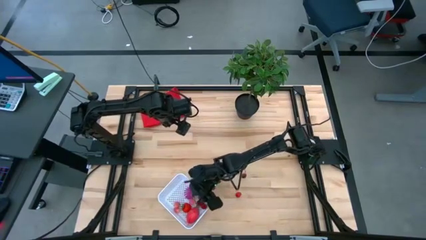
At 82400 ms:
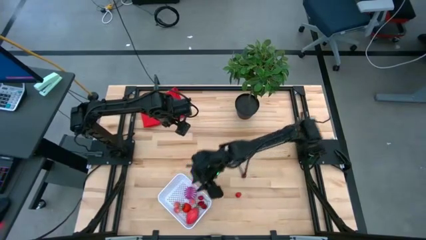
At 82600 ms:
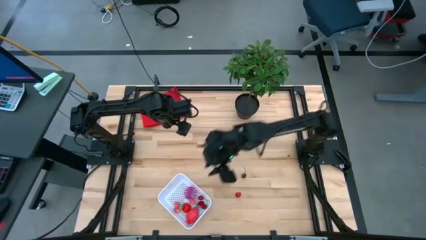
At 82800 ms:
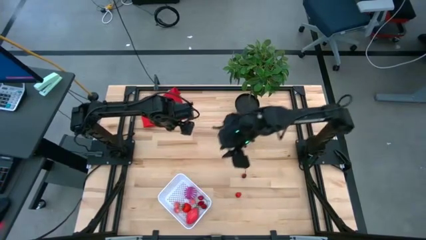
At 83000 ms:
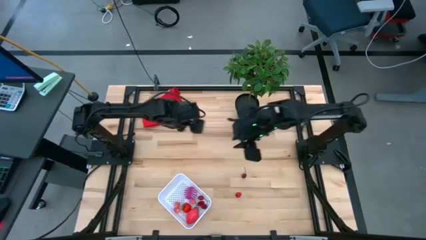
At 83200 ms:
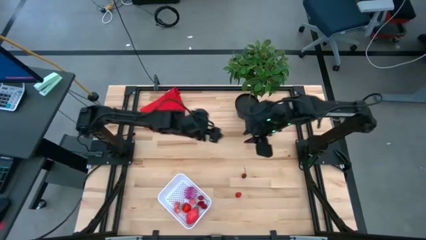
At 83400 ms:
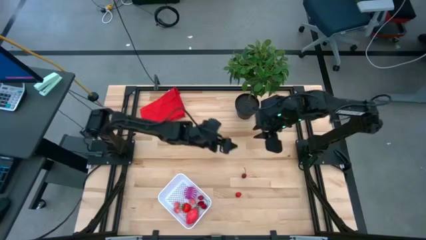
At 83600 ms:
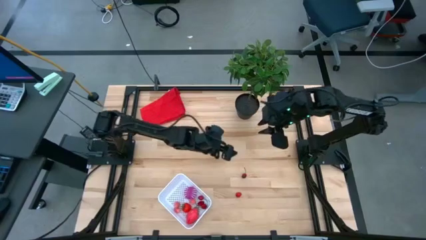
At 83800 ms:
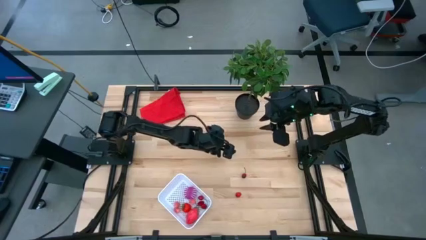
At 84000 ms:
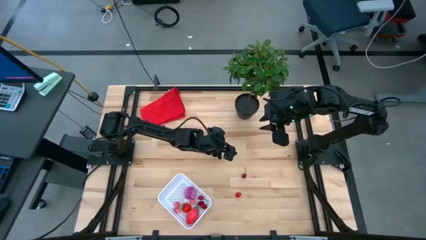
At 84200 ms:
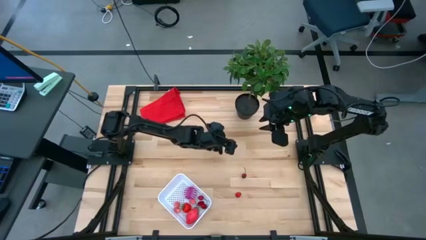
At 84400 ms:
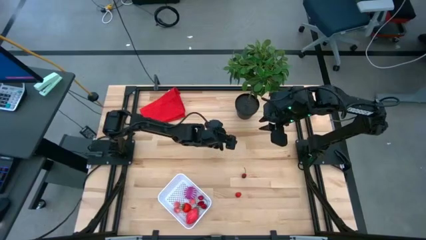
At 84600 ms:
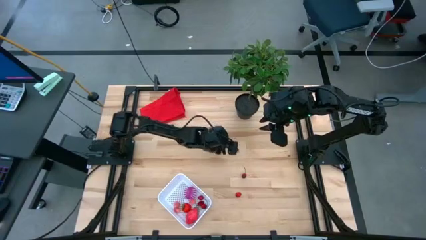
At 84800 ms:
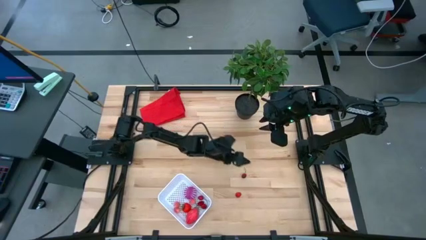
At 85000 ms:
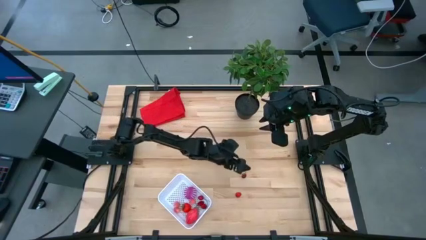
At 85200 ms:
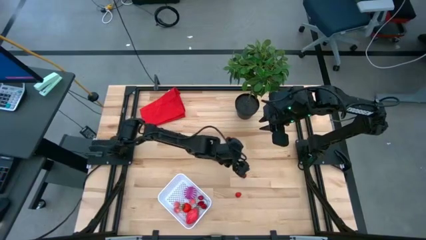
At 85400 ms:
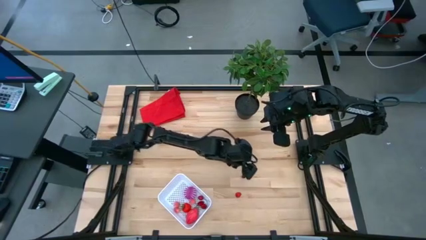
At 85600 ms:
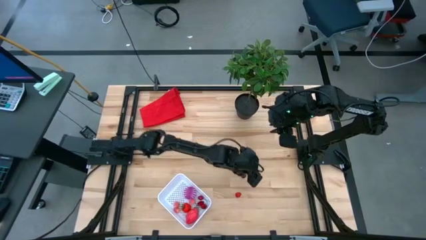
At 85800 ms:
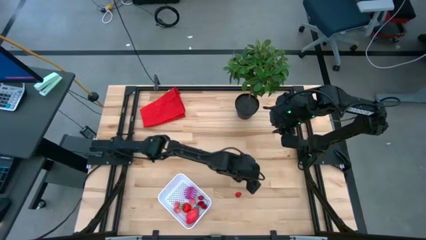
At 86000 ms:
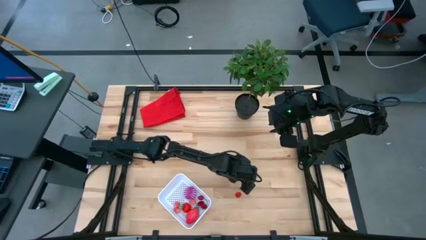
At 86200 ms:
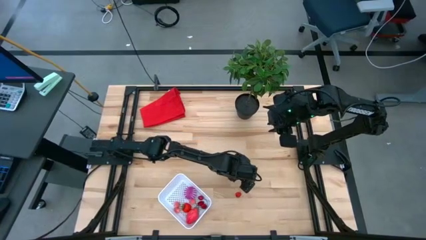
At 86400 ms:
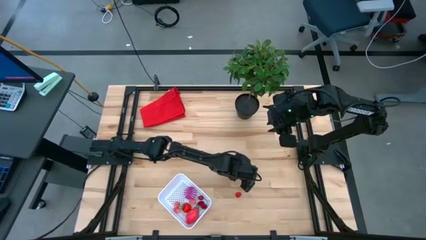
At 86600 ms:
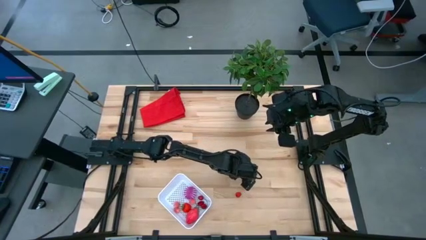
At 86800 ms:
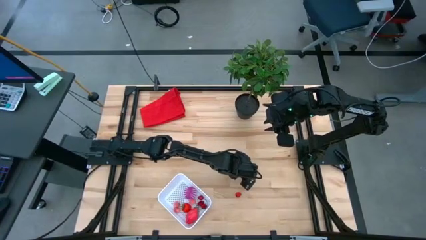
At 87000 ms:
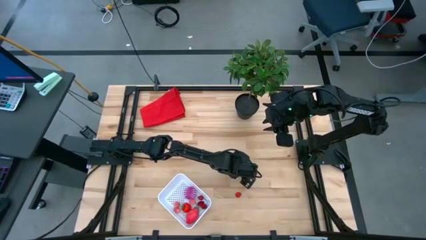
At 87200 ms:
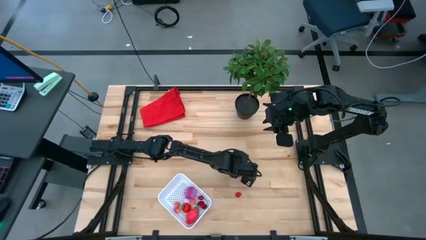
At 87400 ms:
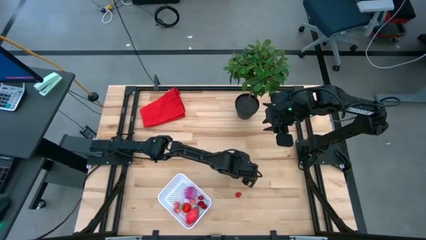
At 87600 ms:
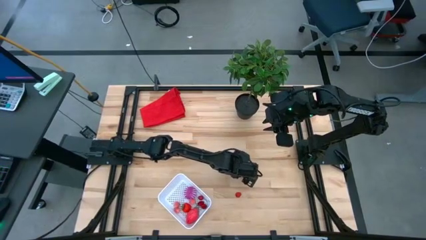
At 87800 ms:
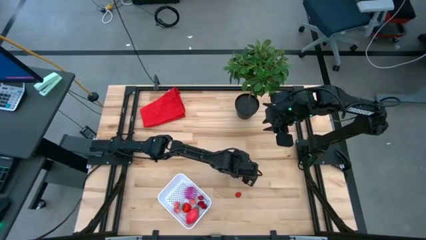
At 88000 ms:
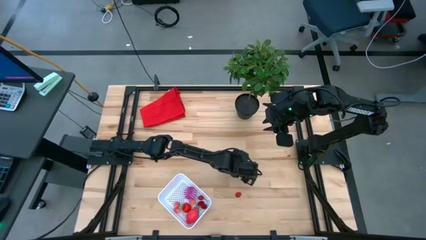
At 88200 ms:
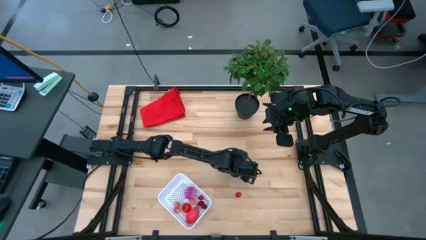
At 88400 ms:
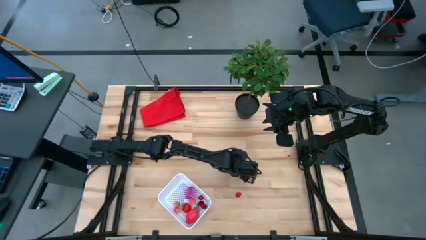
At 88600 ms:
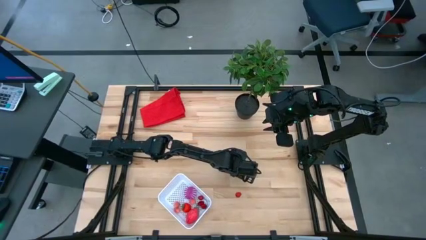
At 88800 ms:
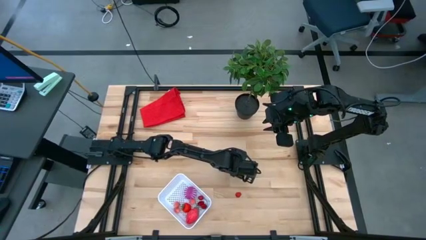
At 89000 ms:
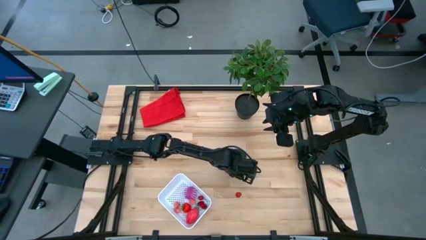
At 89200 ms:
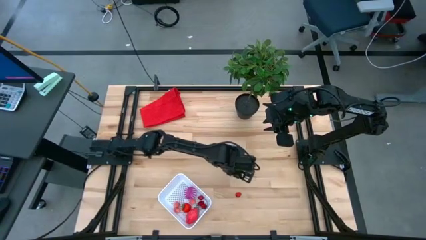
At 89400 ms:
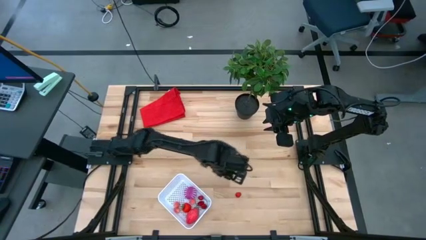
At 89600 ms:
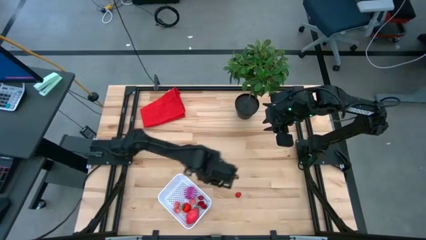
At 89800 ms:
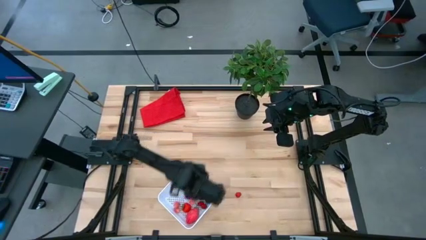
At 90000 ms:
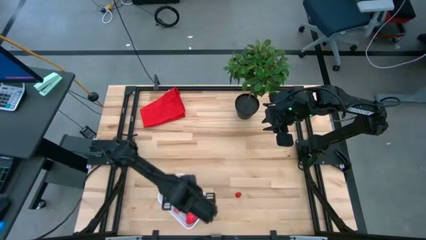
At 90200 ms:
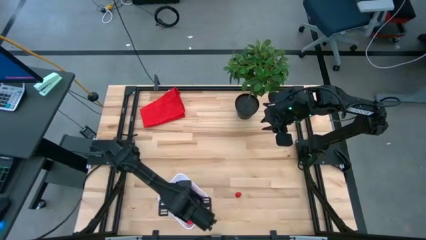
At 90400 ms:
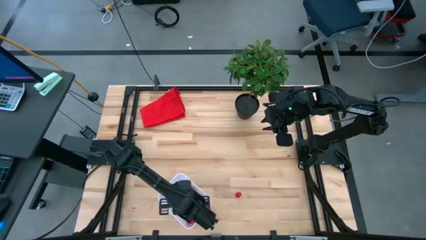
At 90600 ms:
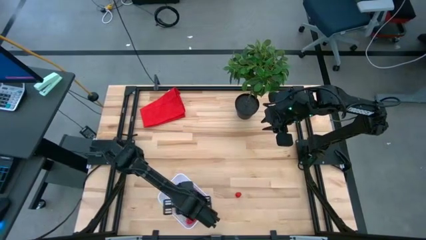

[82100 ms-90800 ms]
Task: Pick and placing Produce into tupperware
Put the cherry in the basket

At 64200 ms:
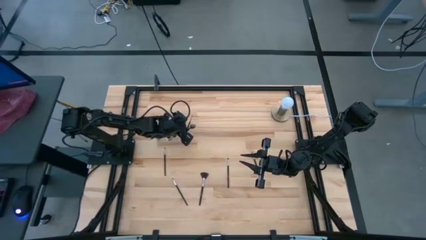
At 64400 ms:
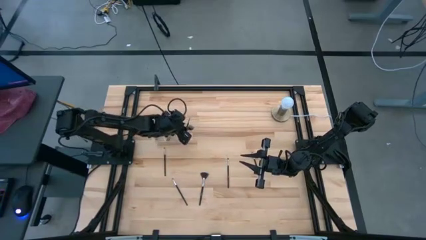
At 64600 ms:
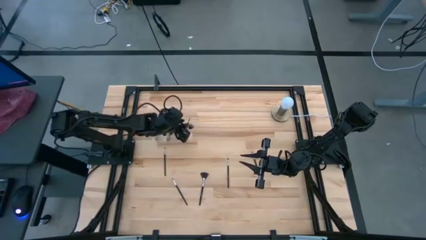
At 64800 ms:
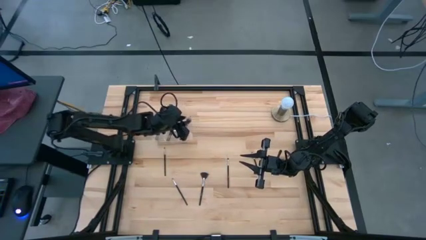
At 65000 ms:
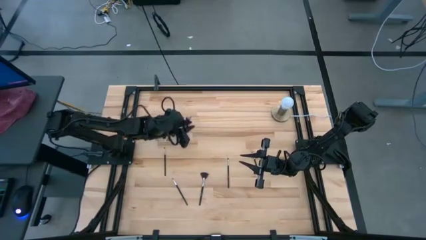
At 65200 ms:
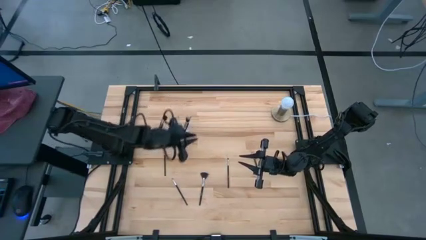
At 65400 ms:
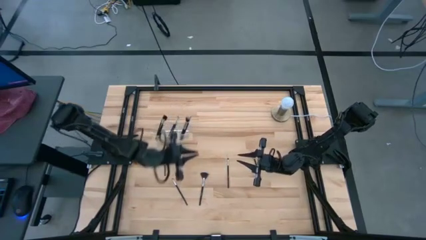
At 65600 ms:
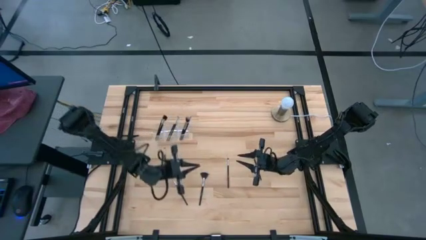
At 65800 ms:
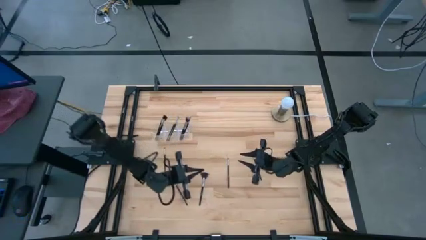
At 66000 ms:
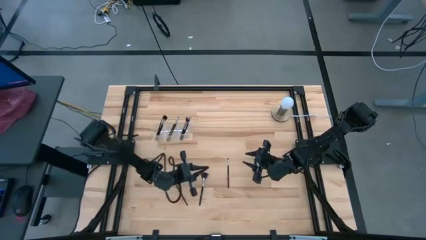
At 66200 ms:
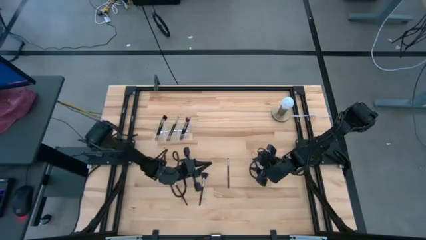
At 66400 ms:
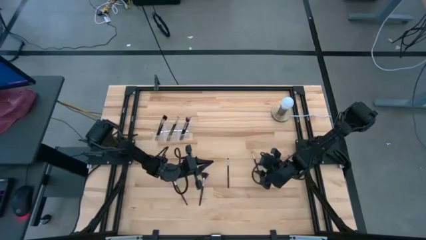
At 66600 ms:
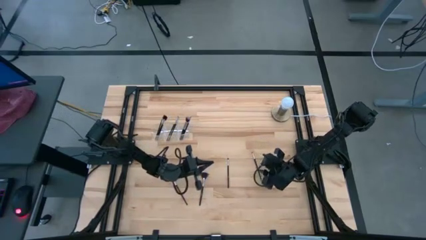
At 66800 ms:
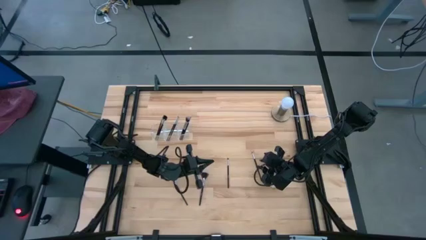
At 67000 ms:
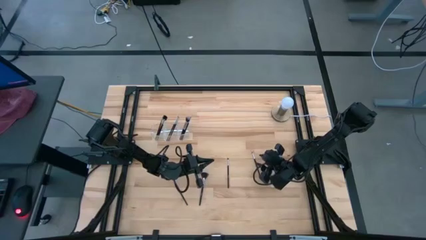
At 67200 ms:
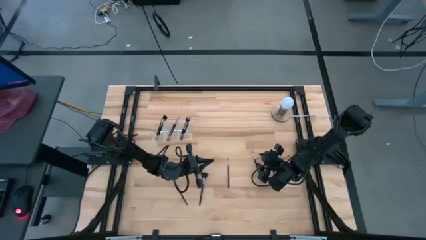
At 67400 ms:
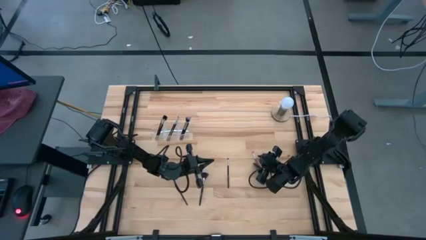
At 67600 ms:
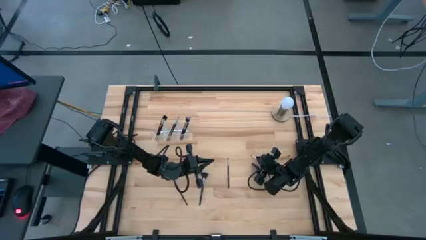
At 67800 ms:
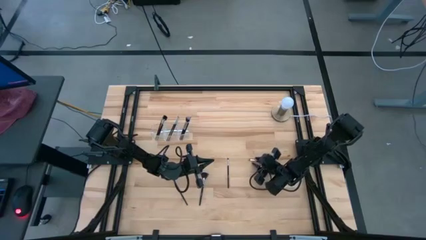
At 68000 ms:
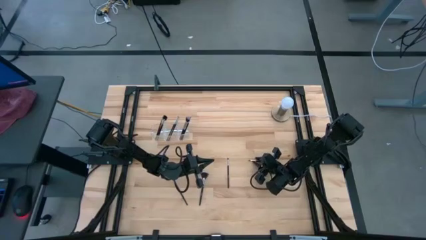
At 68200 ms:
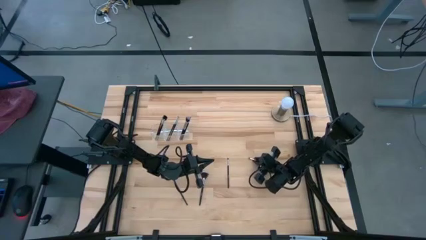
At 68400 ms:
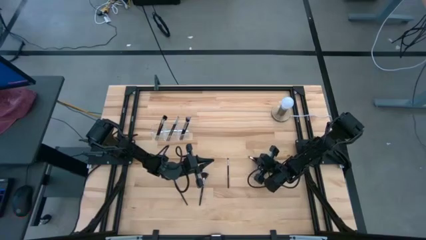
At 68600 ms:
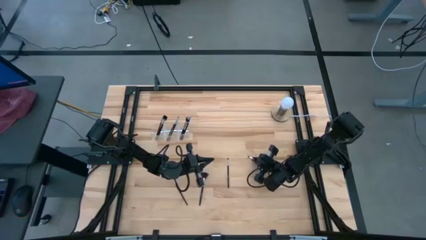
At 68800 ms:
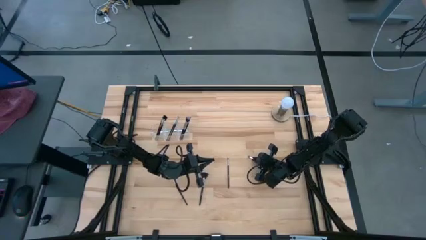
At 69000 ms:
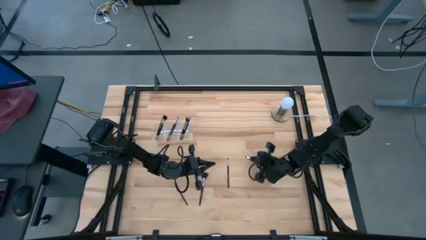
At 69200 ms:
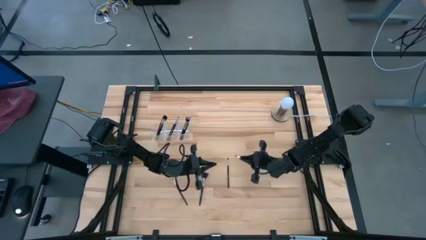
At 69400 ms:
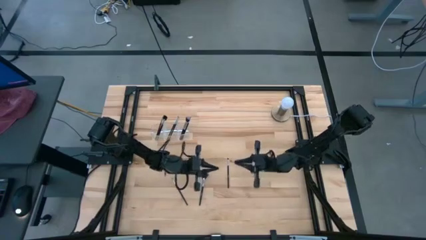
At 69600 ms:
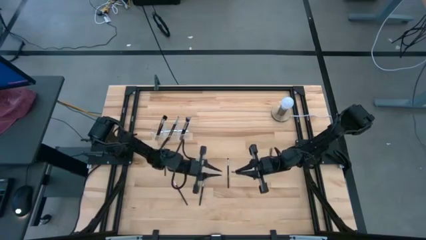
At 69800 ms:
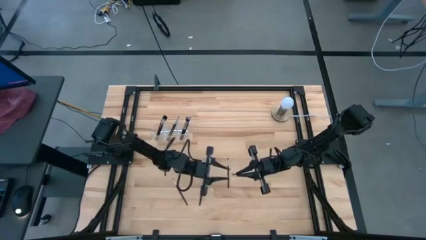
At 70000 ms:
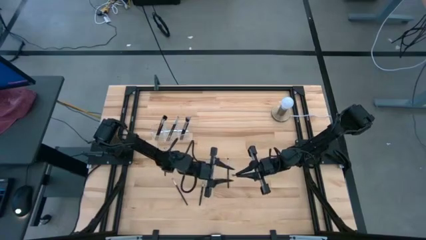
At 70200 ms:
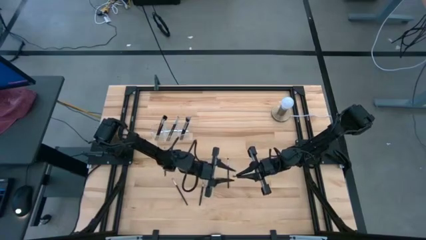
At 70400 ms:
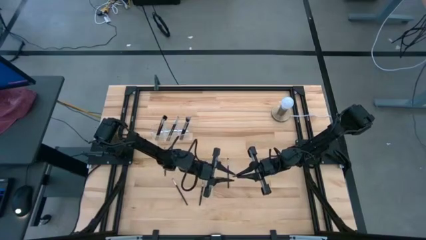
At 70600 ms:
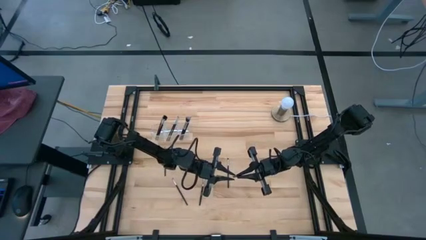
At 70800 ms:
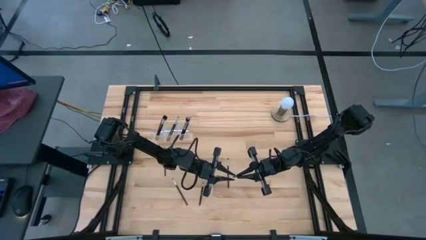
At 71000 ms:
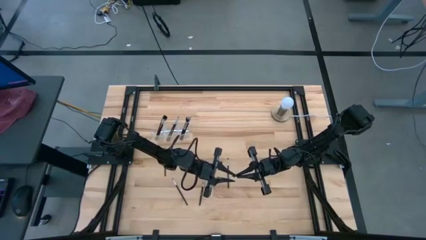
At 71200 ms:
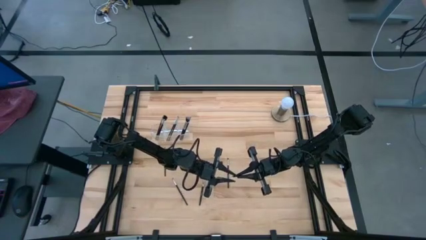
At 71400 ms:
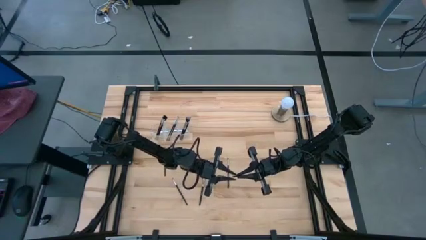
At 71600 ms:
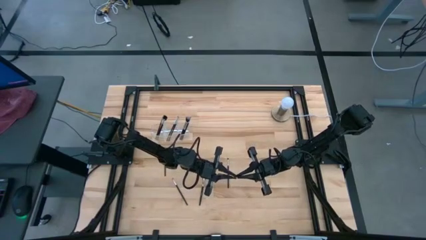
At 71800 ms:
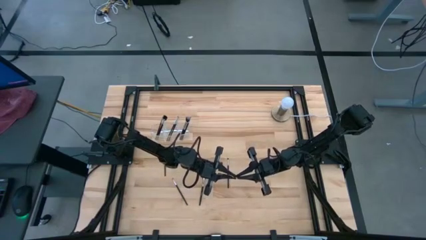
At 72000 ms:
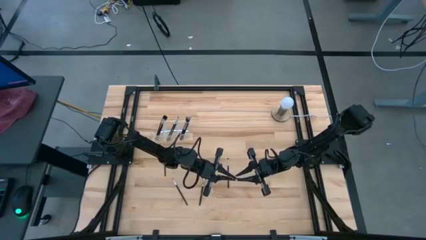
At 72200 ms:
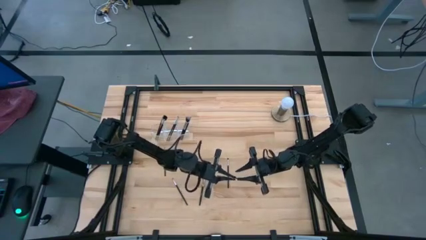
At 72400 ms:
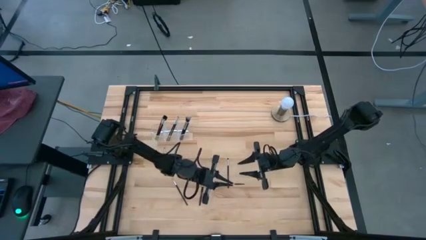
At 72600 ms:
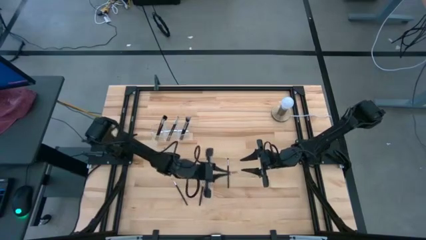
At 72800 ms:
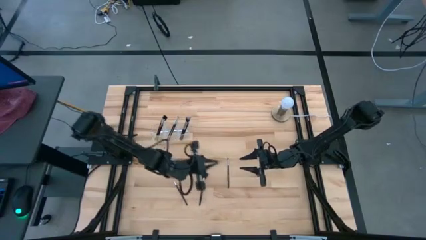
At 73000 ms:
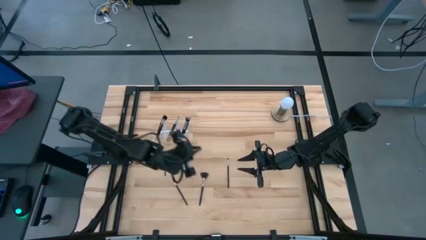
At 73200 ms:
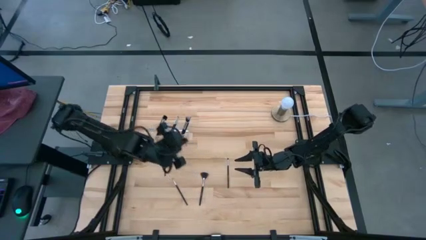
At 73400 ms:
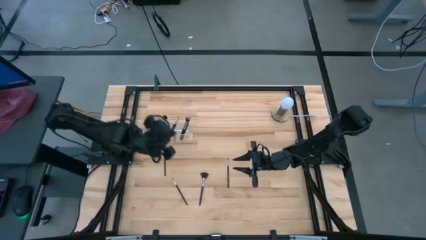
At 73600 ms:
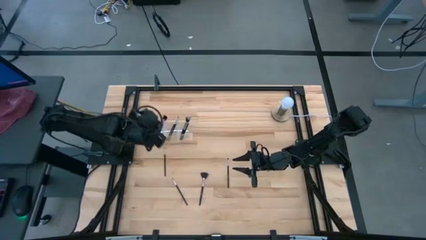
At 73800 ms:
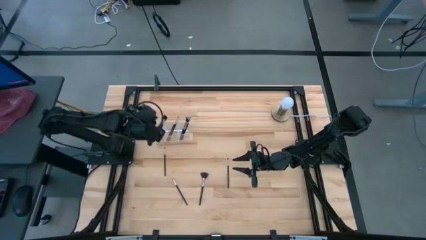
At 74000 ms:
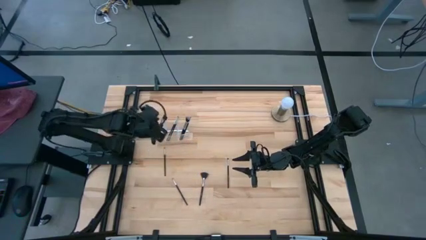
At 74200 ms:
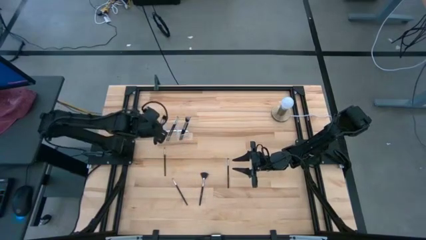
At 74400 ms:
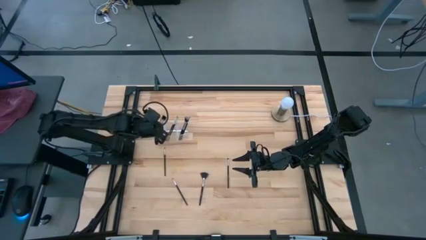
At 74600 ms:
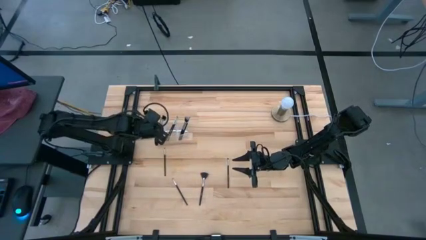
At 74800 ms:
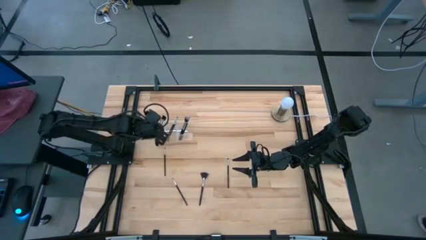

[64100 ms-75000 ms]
Task: Pick & Place Makeup Brushes
Put the black eyeshadow brush into the transparent organizer
